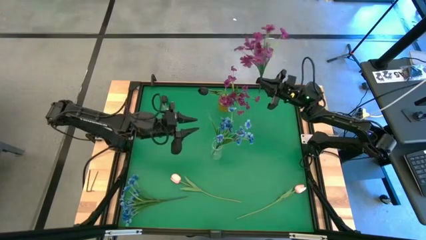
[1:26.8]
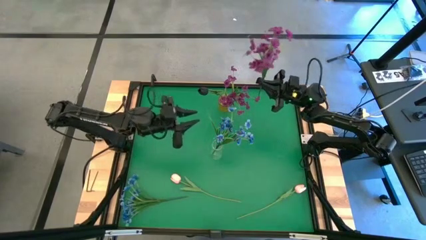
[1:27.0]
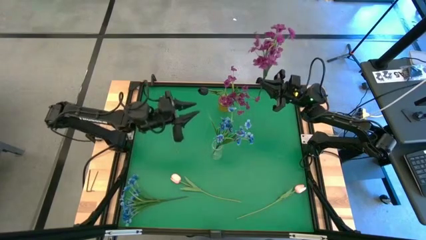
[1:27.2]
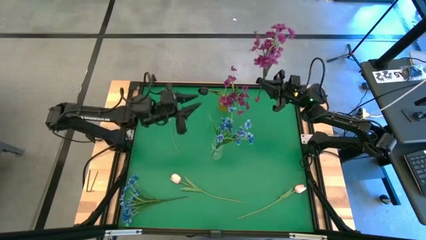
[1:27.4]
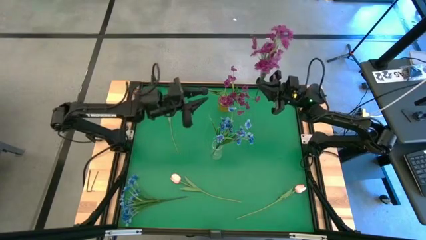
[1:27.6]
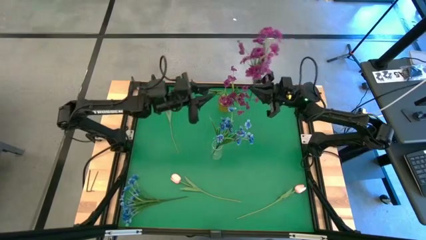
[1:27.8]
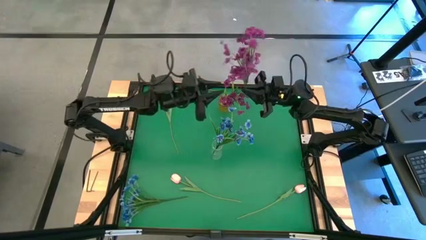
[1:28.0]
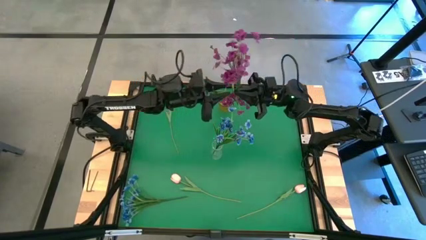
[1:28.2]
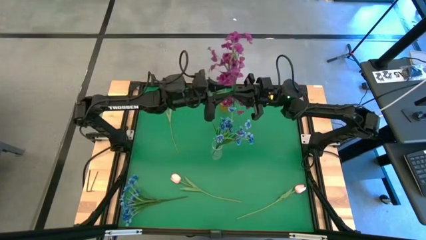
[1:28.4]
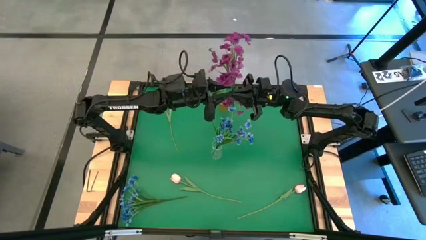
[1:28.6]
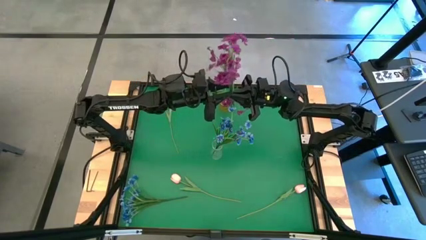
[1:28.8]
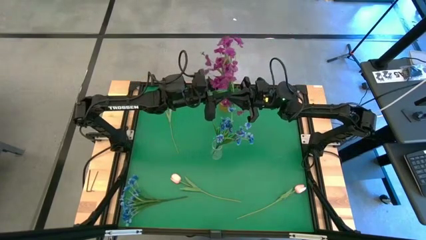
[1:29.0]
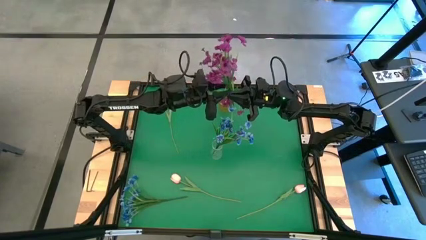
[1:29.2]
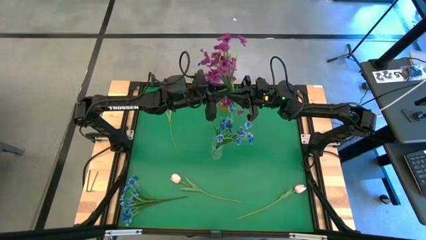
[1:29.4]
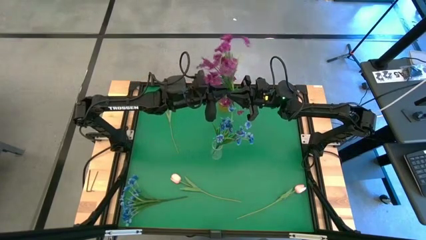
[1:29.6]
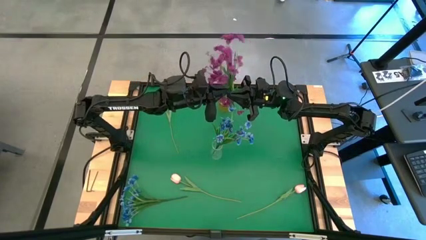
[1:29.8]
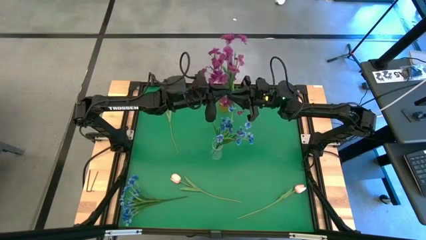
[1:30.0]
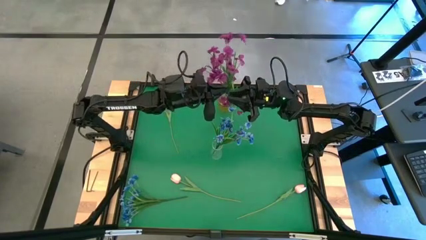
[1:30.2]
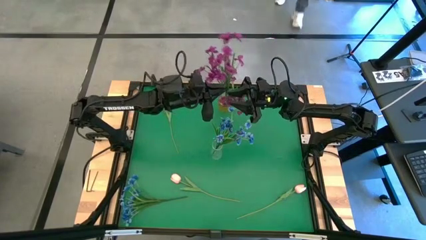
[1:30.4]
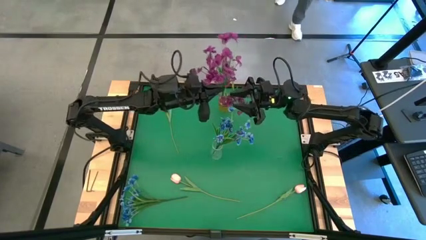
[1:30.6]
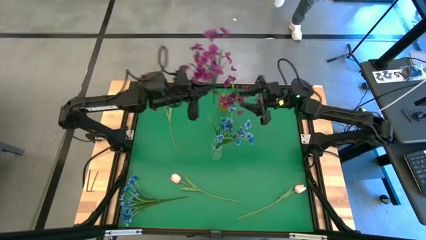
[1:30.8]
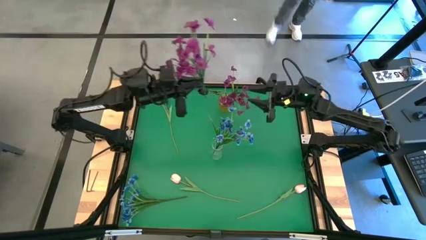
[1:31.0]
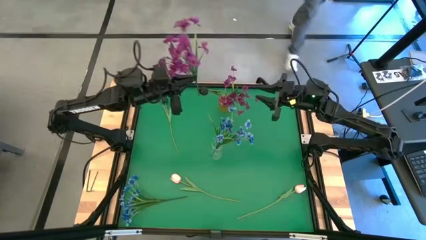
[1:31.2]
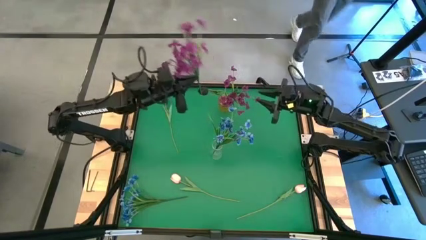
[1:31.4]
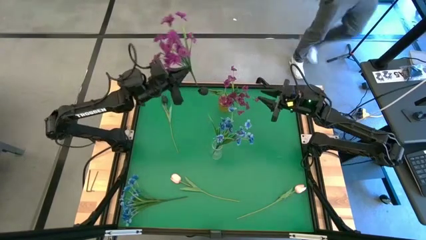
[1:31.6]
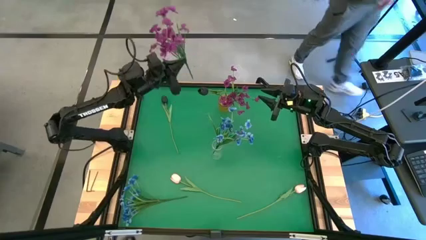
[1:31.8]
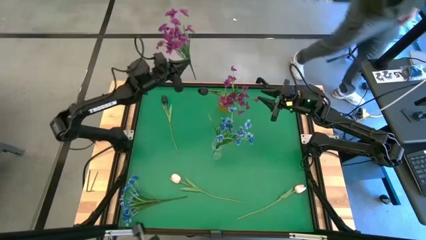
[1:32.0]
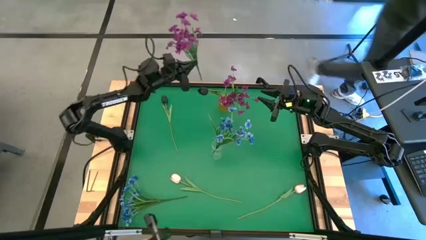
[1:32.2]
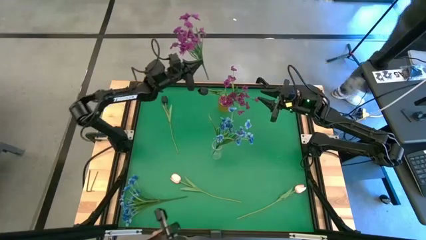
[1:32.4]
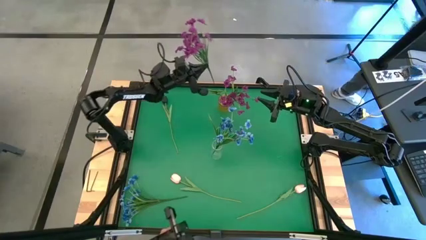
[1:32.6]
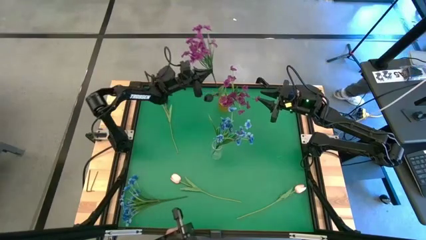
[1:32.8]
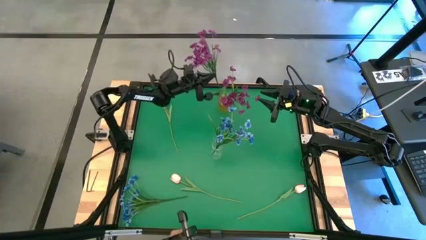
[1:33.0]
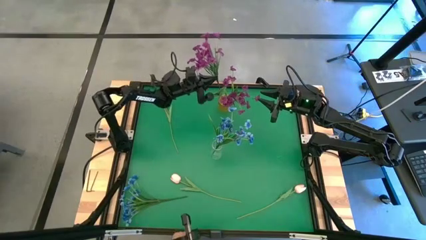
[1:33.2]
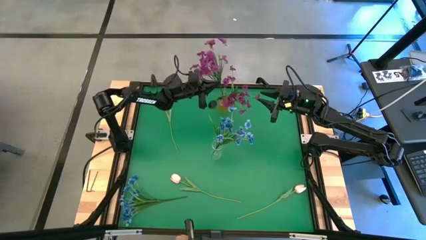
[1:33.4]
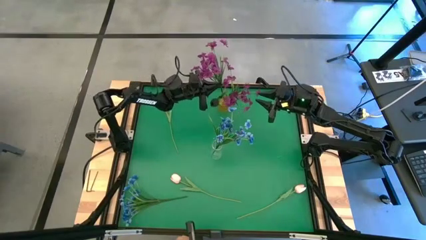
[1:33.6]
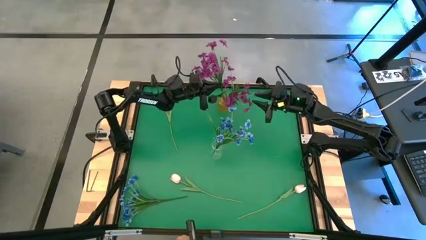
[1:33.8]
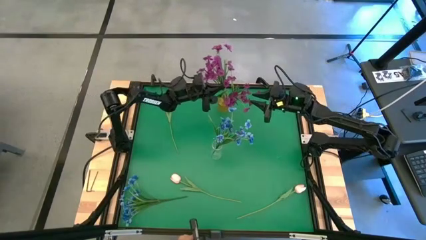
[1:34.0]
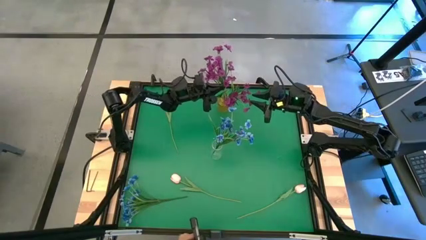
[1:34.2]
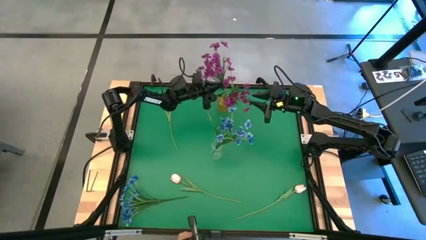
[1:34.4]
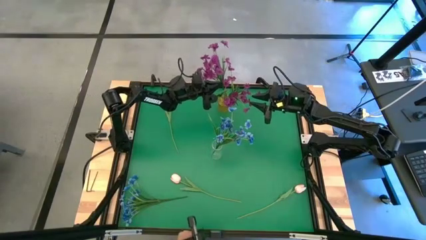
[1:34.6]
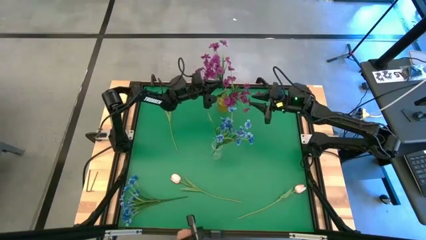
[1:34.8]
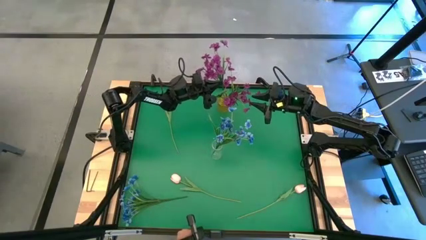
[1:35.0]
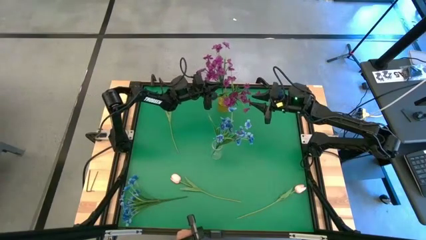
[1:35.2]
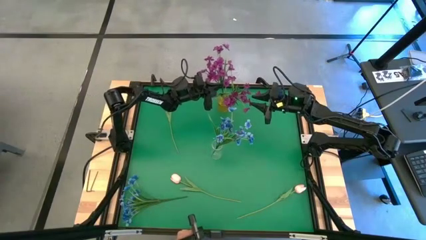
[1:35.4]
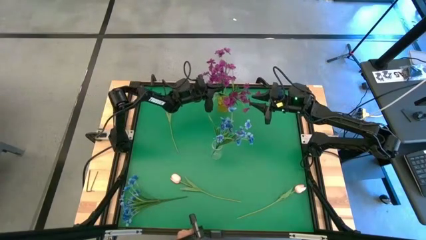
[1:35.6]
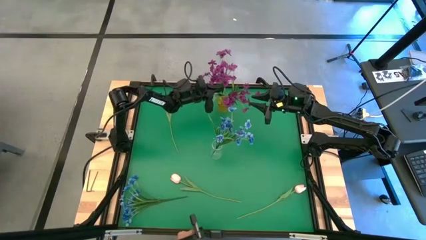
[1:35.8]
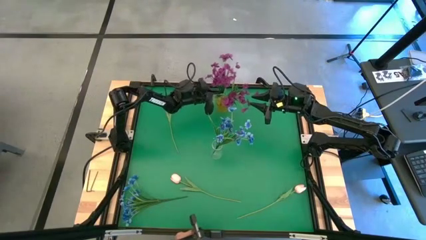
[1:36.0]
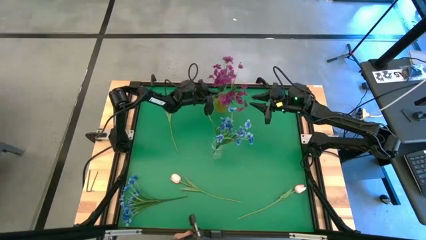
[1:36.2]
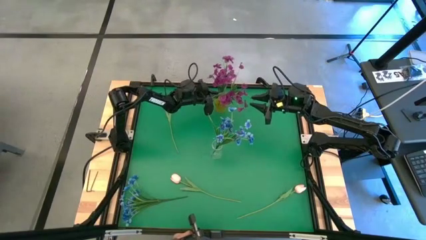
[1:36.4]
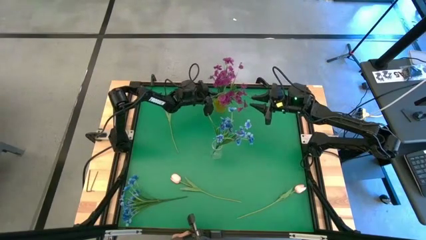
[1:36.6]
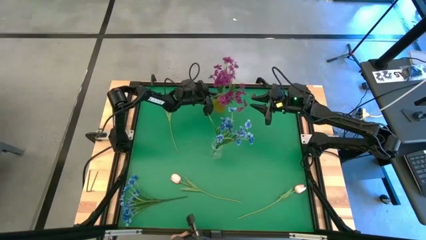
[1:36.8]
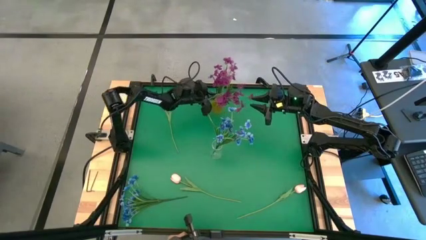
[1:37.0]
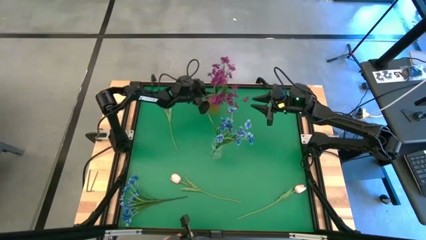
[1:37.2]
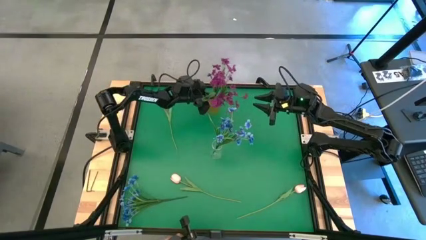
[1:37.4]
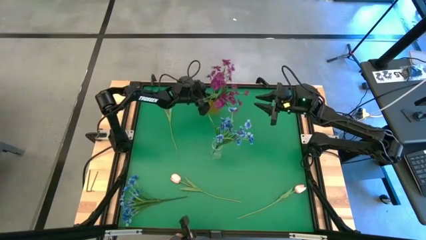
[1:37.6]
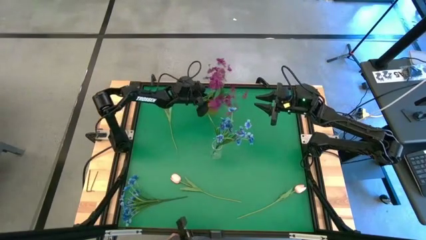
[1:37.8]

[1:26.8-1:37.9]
Task: Sort flowers into vase by color
Put the purple flowers into the yellow vase

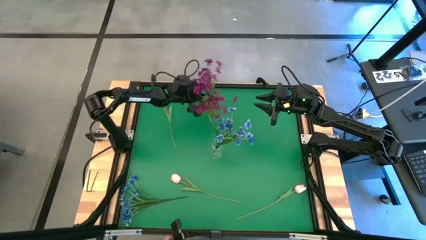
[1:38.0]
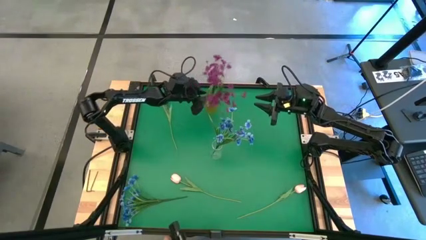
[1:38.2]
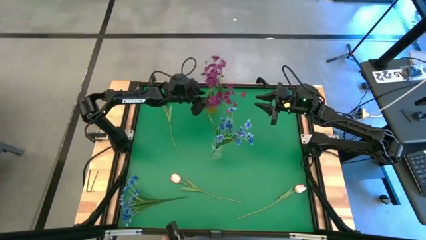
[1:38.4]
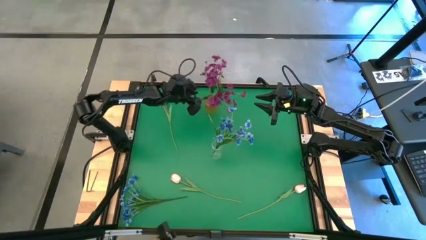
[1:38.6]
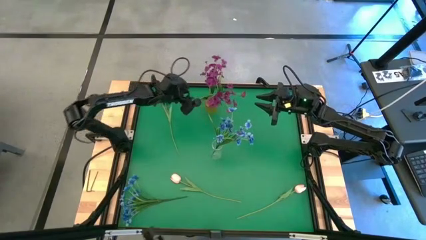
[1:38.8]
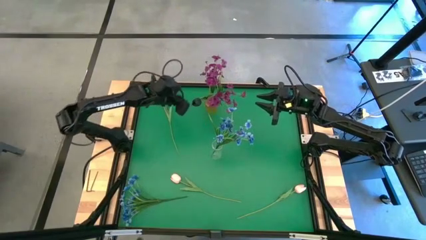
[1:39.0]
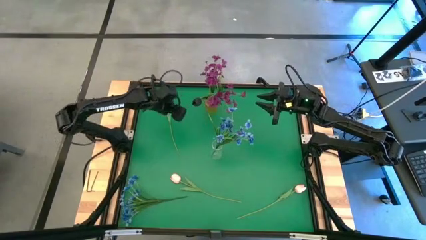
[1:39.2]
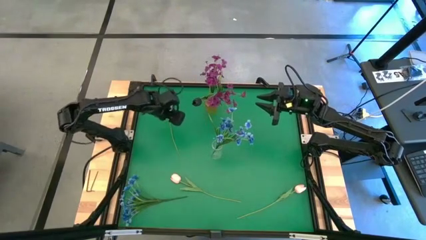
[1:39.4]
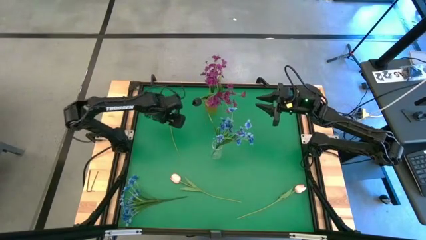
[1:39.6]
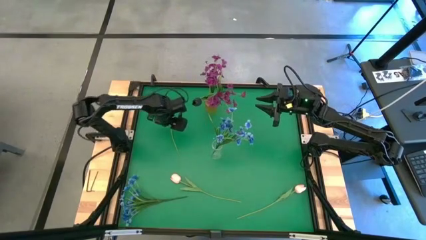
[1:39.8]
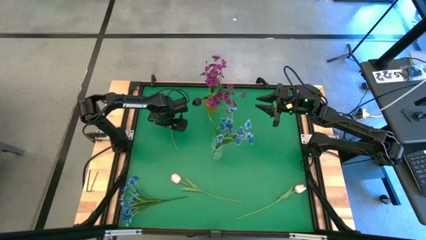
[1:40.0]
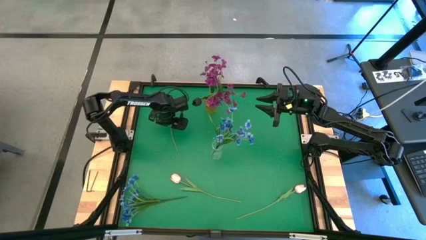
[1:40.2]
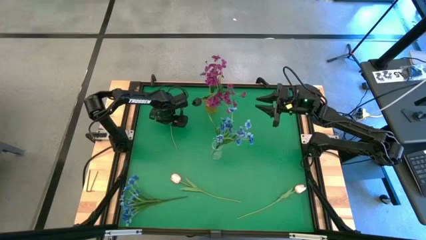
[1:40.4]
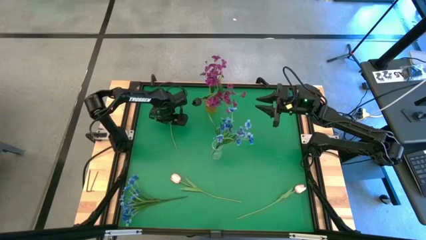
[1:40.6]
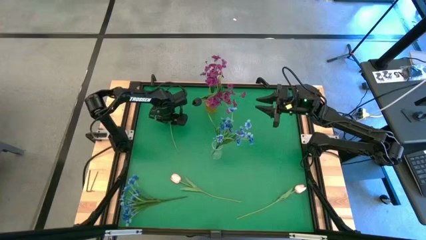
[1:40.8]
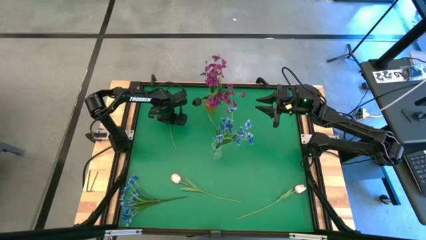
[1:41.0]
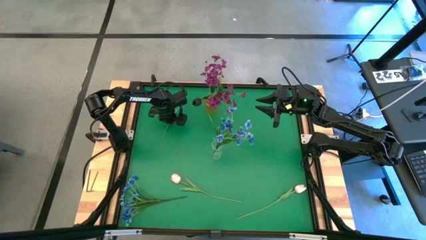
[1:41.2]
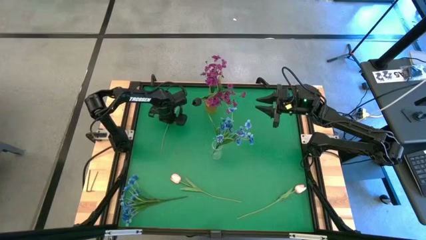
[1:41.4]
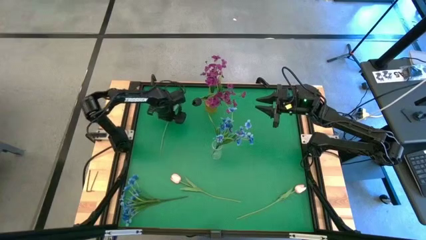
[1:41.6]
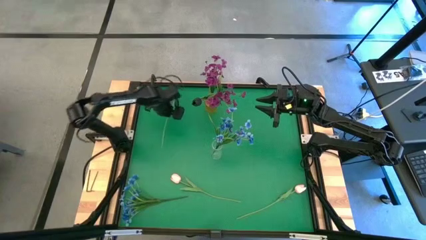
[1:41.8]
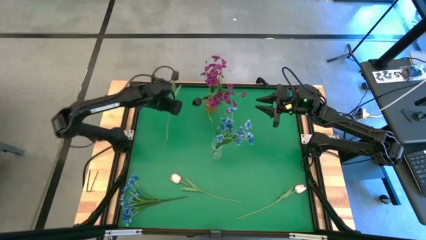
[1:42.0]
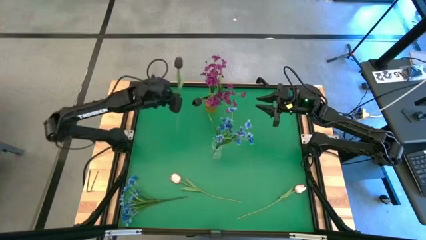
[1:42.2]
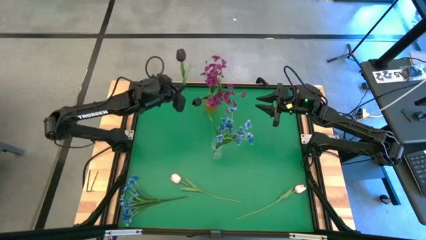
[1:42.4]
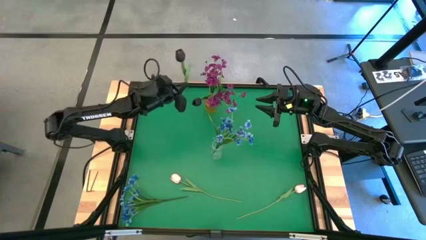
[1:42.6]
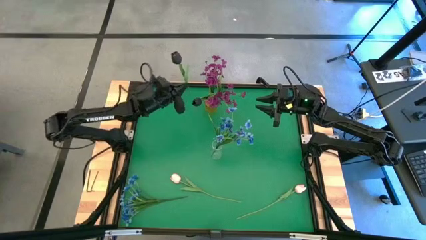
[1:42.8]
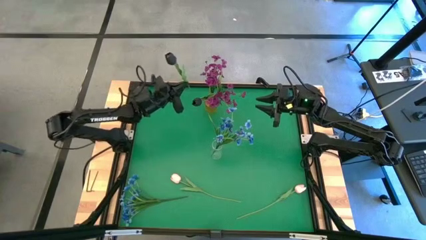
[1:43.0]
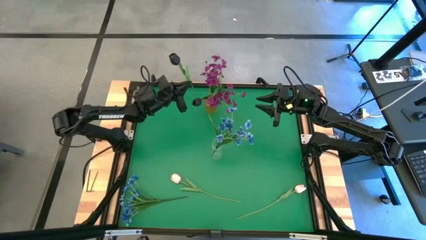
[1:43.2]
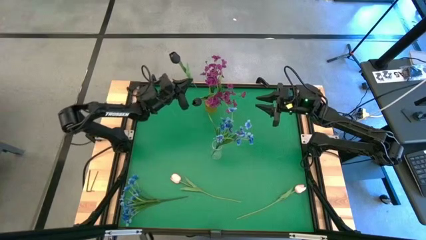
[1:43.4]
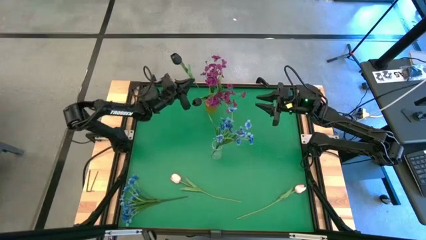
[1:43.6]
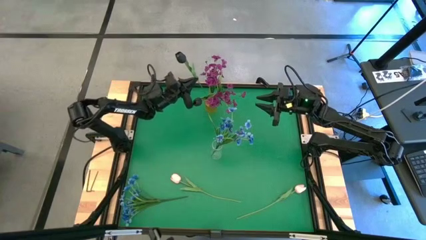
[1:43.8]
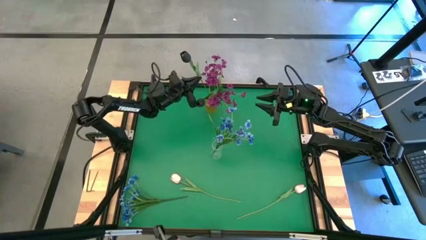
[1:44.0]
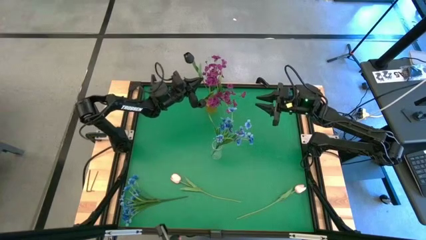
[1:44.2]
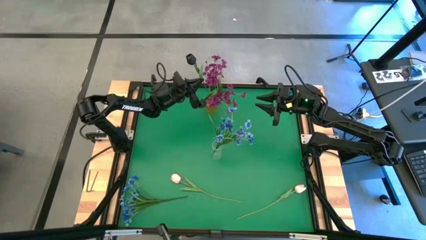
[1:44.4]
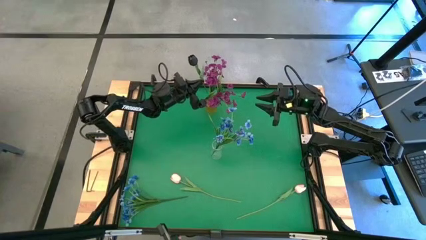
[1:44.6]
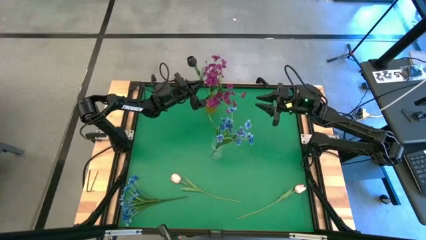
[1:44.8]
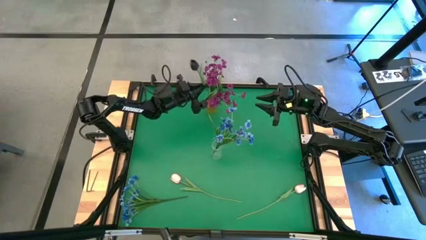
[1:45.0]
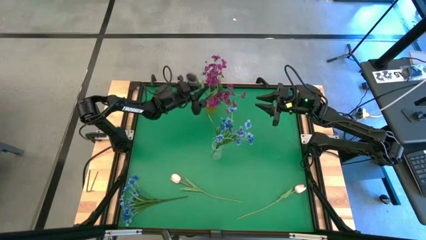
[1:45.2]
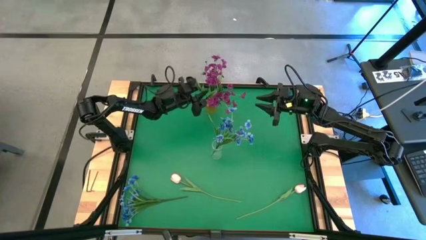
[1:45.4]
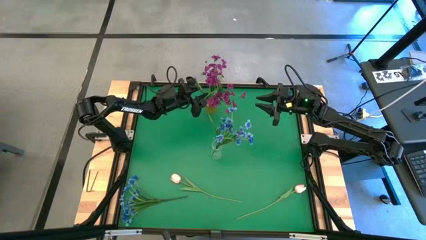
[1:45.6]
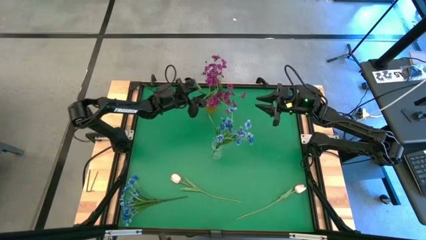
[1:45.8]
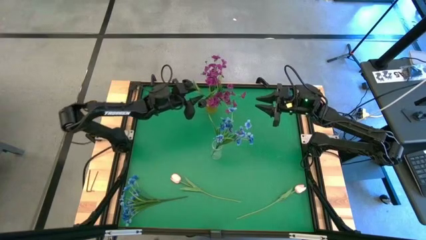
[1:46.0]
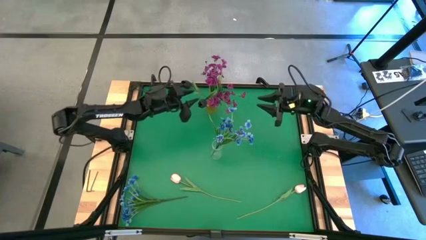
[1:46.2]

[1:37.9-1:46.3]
Put the black flowers into the yellow vase
